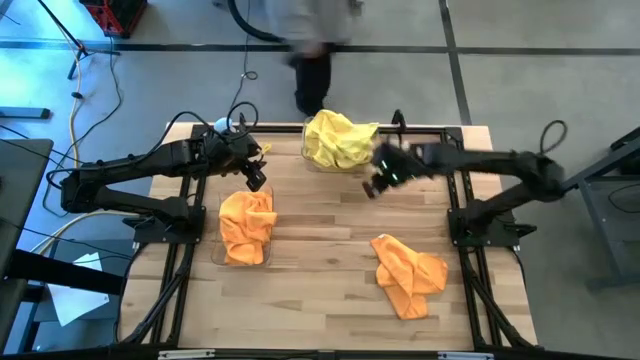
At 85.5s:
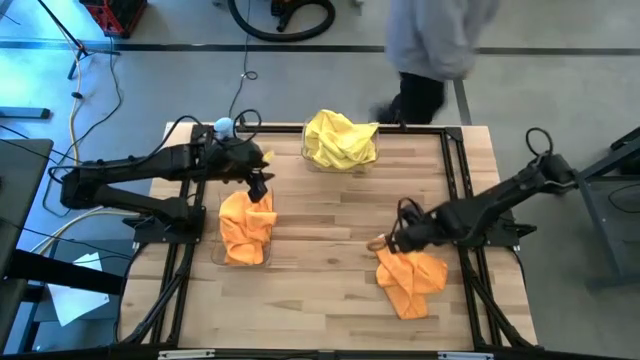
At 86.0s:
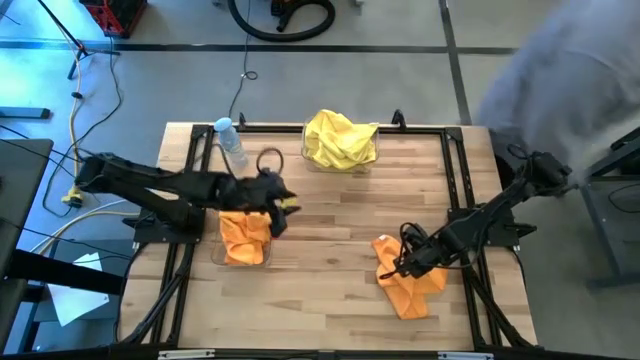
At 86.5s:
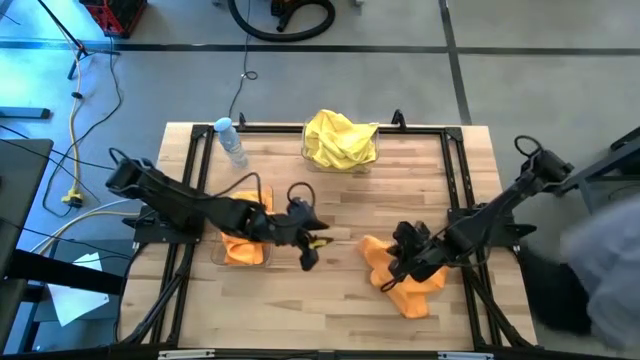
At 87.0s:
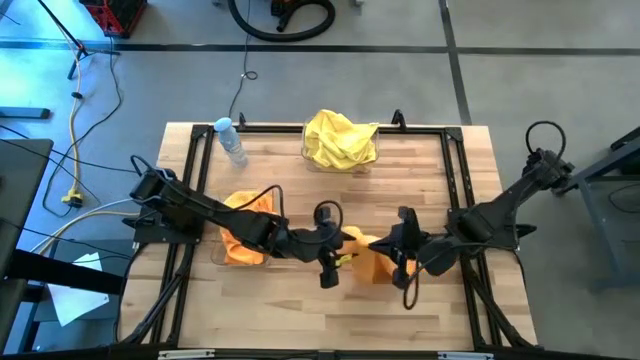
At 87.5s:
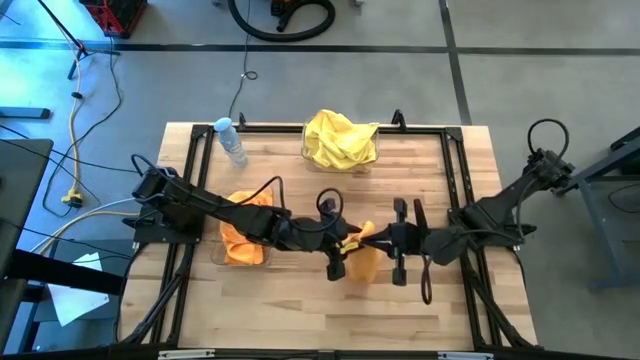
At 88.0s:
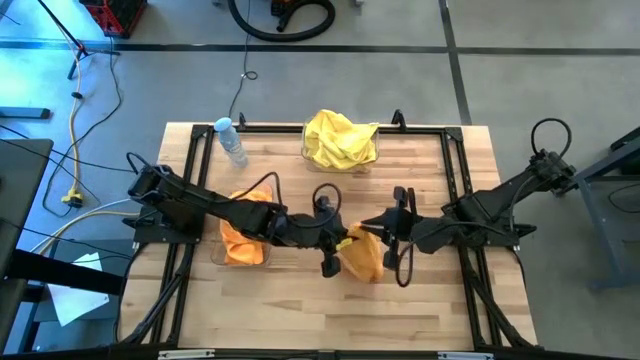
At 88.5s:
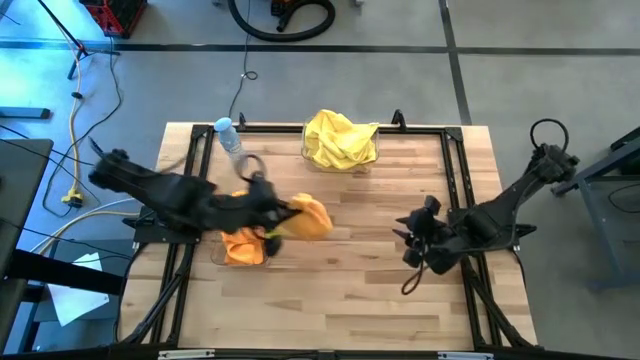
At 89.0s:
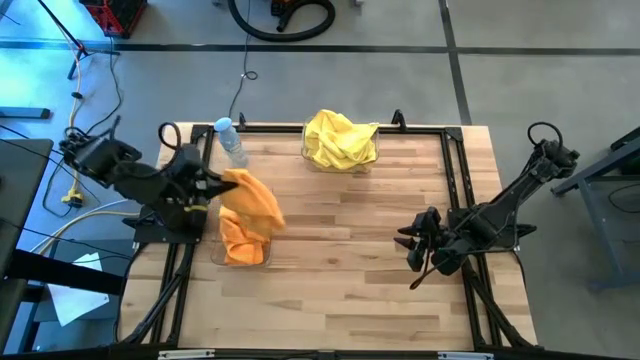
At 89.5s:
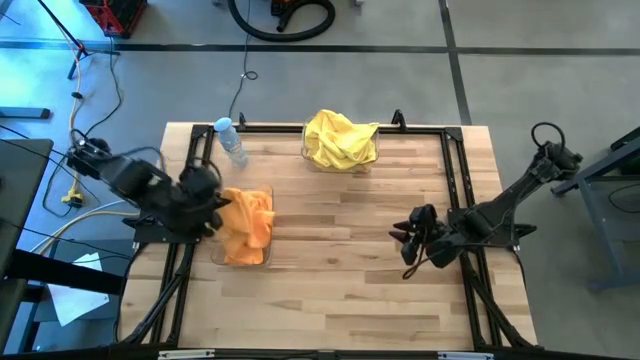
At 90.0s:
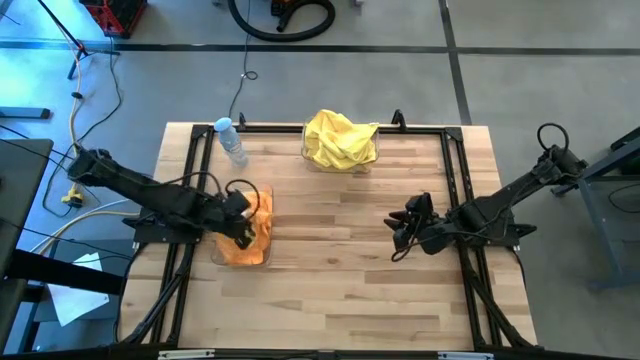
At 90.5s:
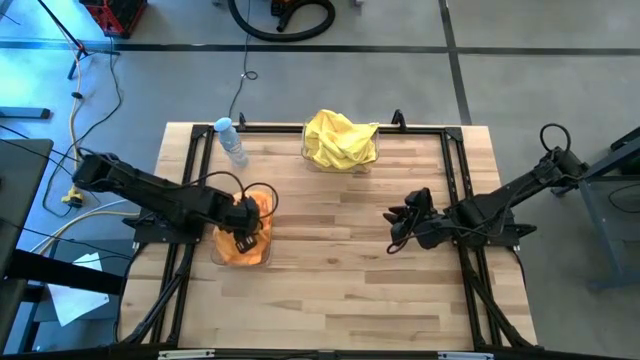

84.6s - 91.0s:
Task: Sort microfiber towel by color & place in baskets
Put the orange microfiber towel into the bottom transparent bin

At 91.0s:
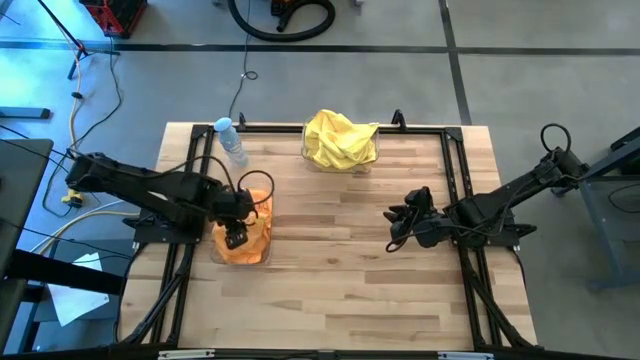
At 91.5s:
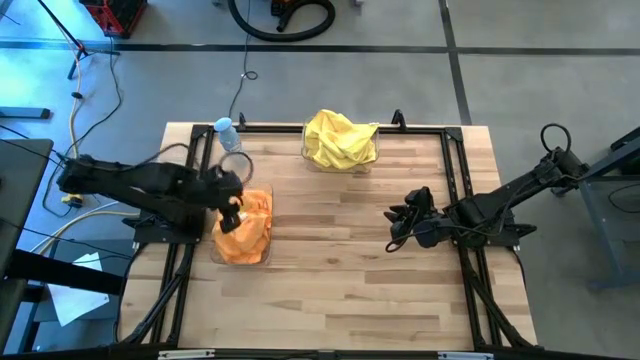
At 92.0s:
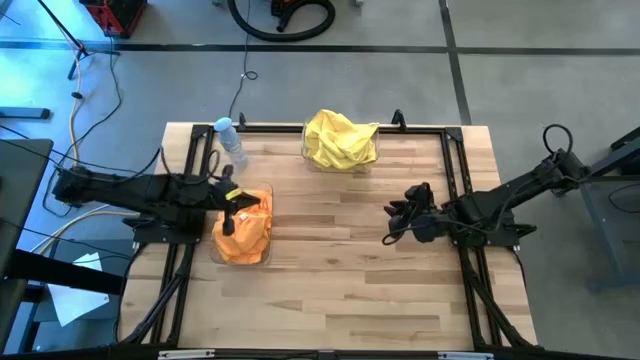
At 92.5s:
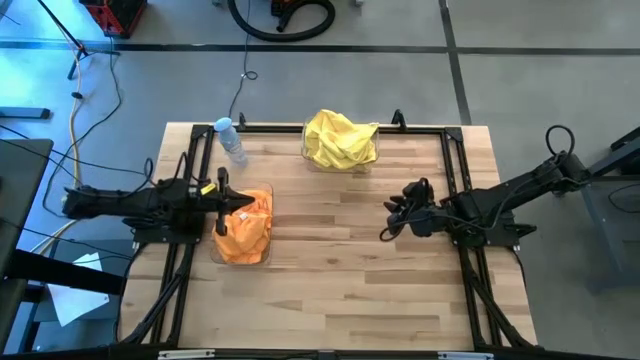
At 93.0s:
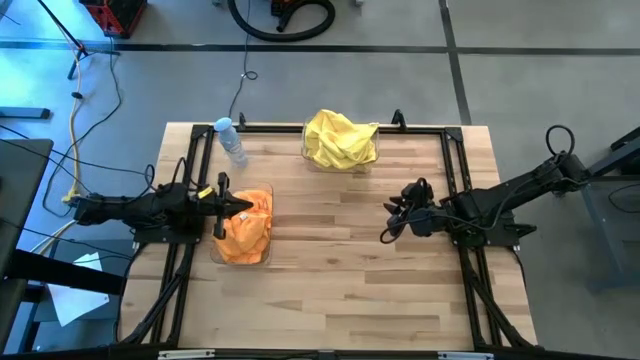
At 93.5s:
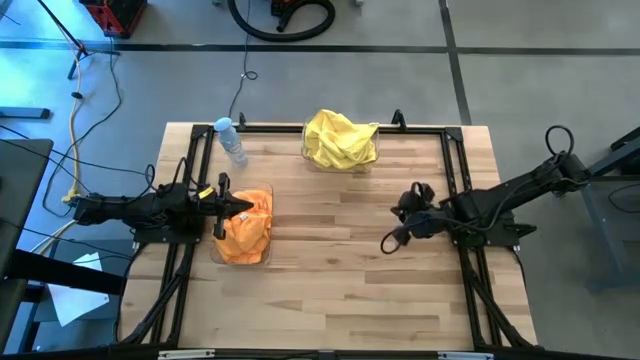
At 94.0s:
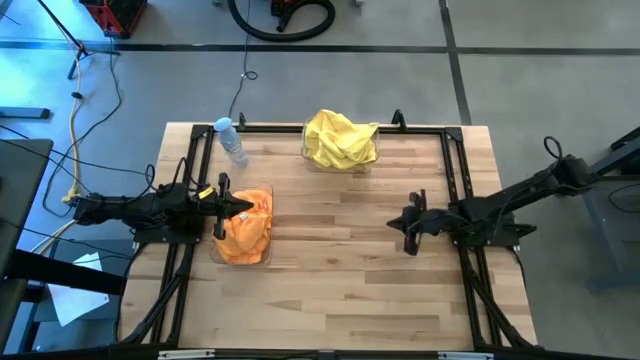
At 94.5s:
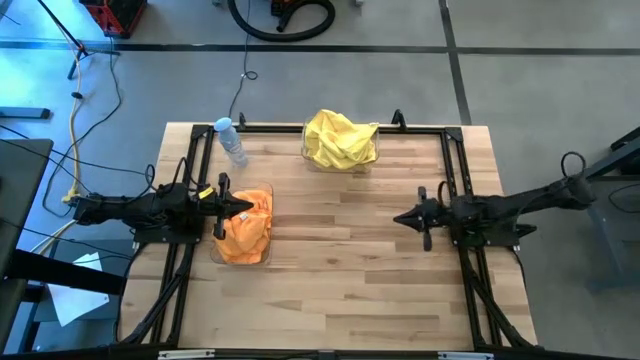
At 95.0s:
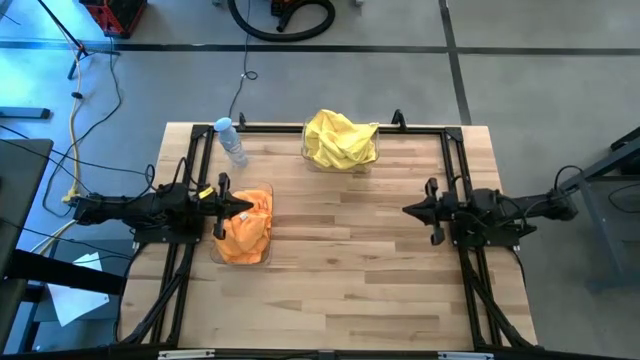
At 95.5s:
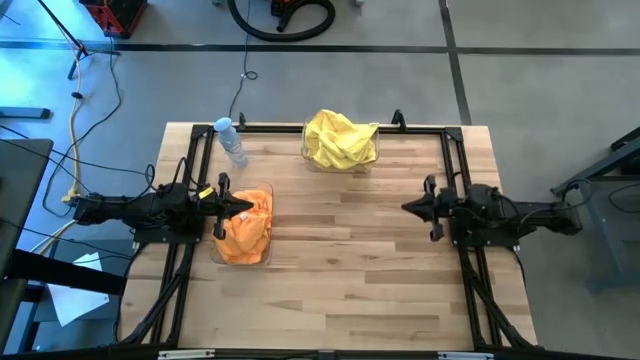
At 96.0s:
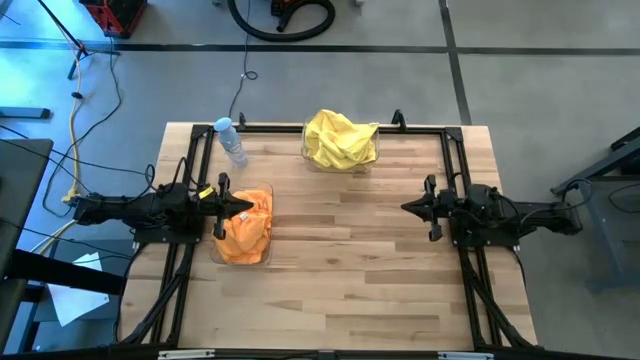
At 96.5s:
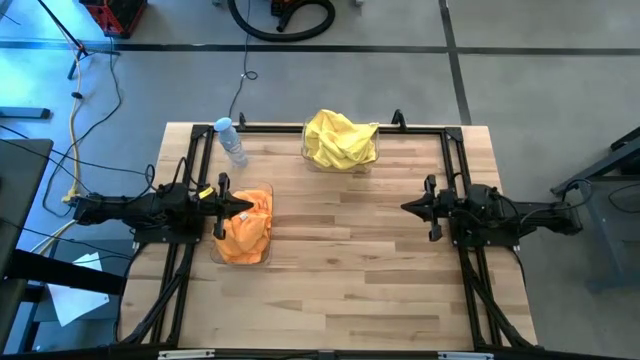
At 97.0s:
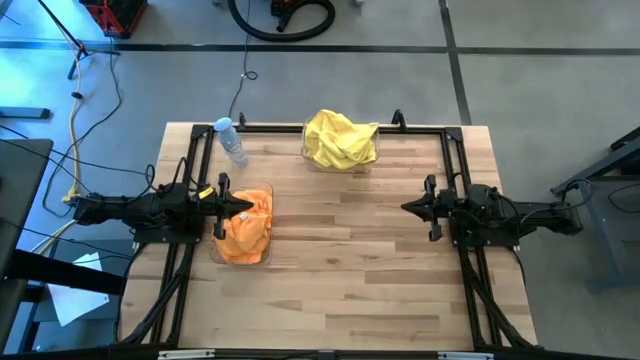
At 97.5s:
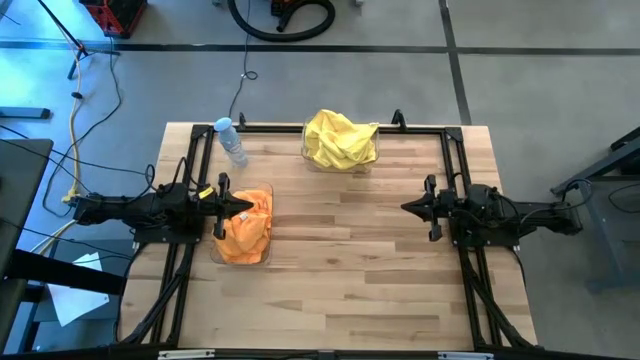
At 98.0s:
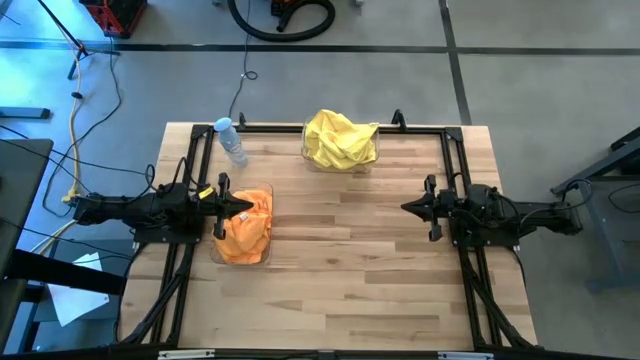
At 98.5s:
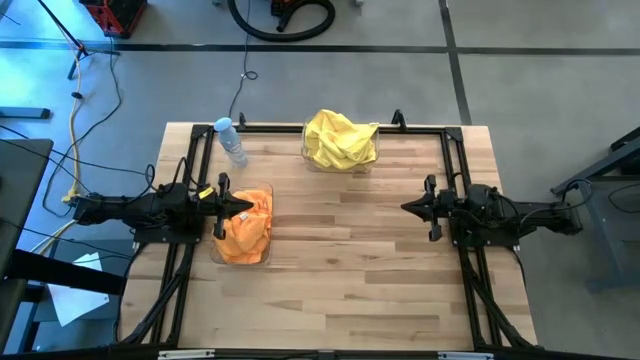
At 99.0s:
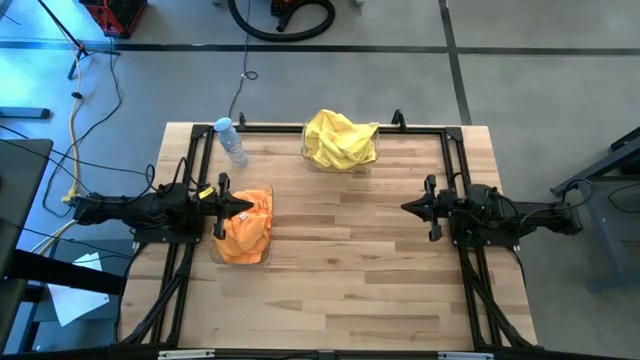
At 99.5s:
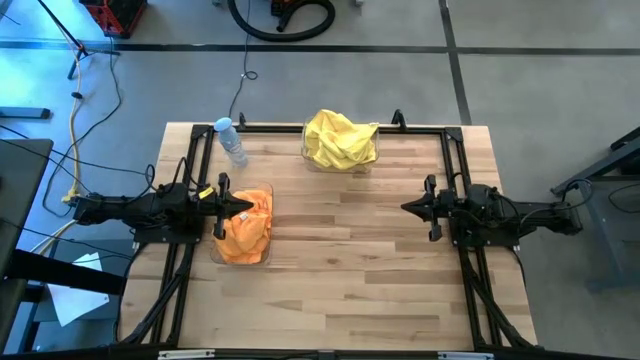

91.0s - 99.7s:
Return to Home Position

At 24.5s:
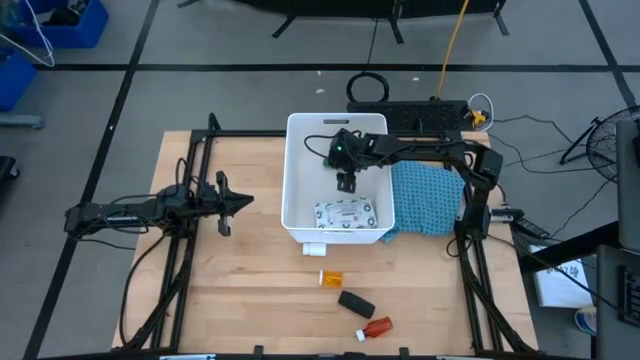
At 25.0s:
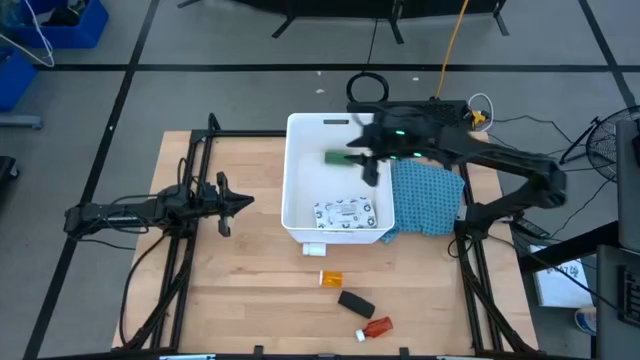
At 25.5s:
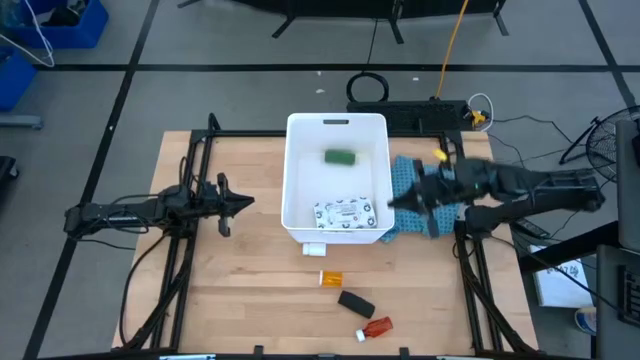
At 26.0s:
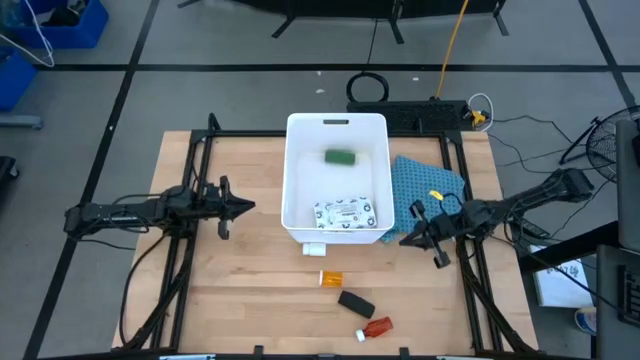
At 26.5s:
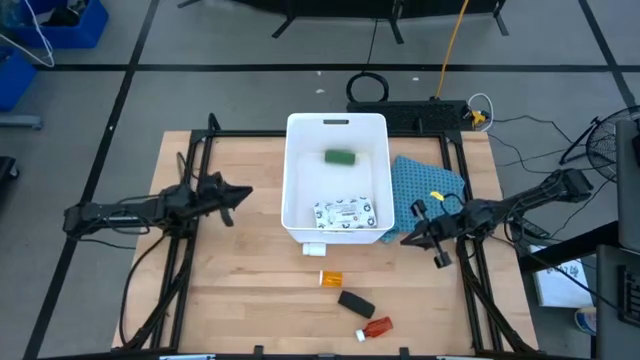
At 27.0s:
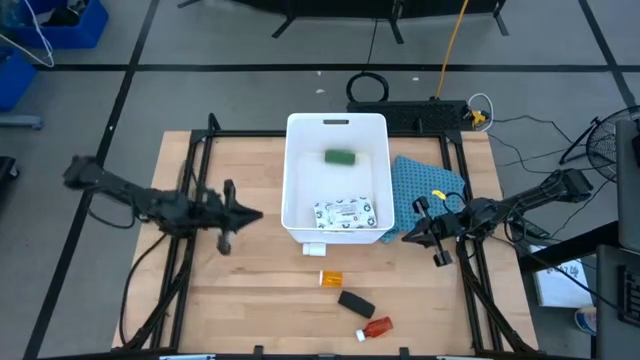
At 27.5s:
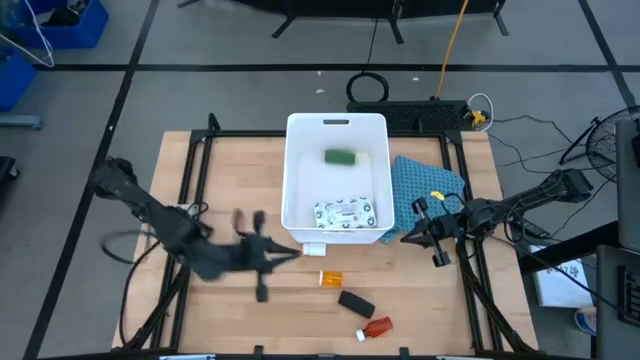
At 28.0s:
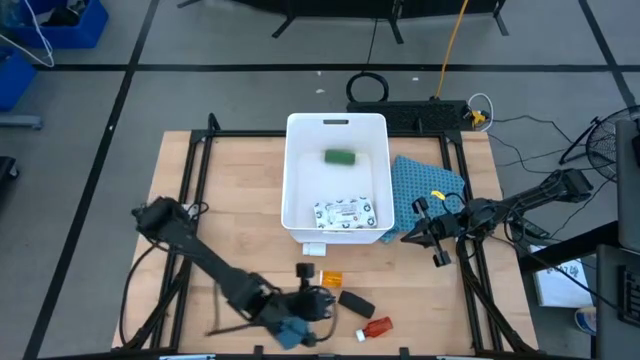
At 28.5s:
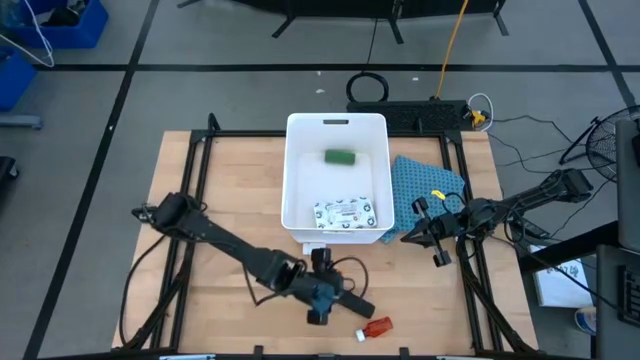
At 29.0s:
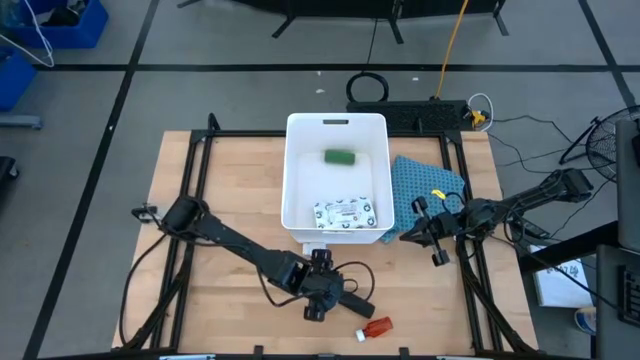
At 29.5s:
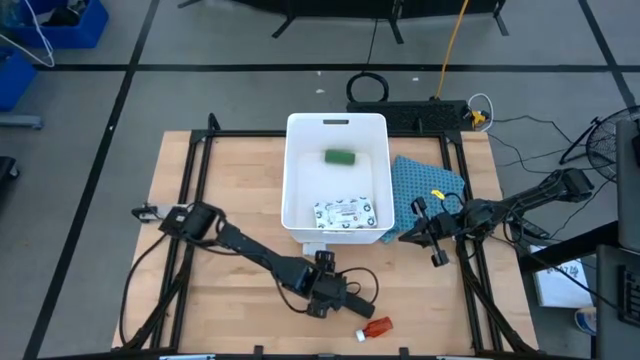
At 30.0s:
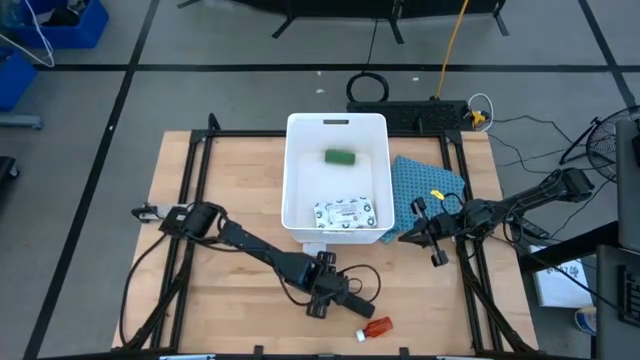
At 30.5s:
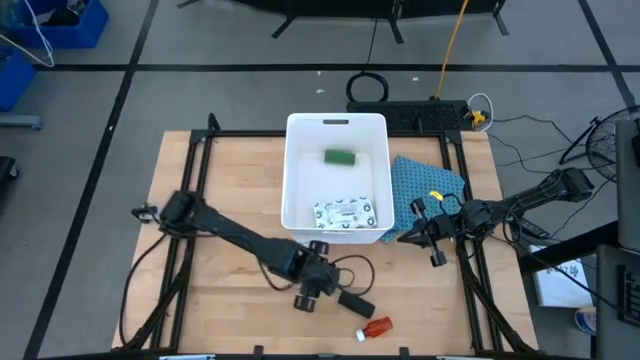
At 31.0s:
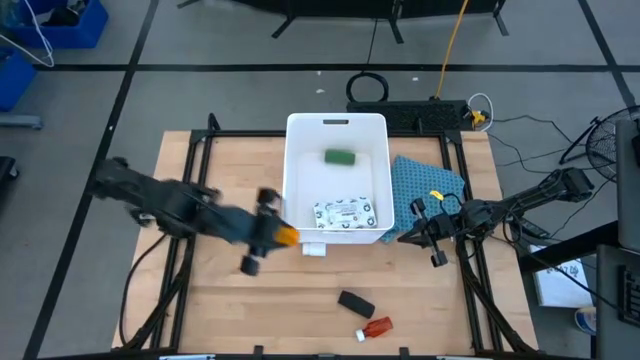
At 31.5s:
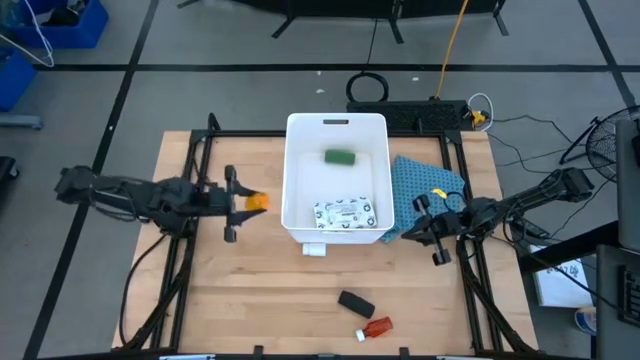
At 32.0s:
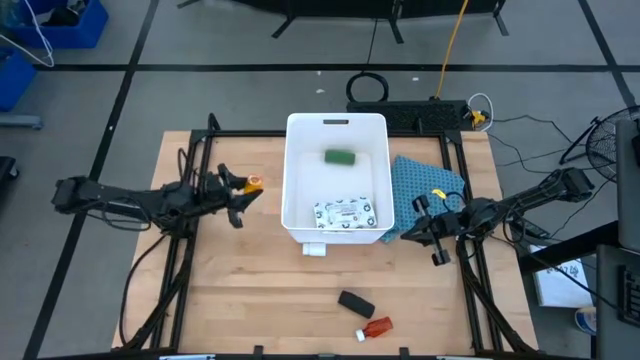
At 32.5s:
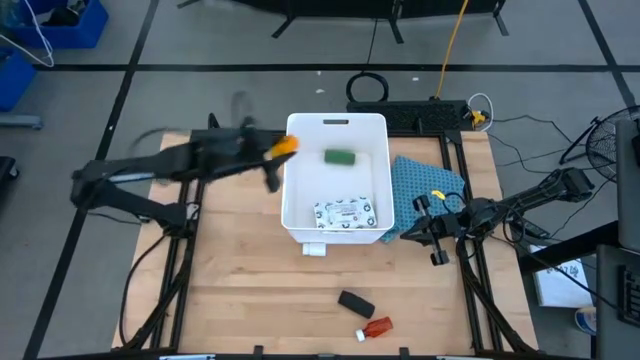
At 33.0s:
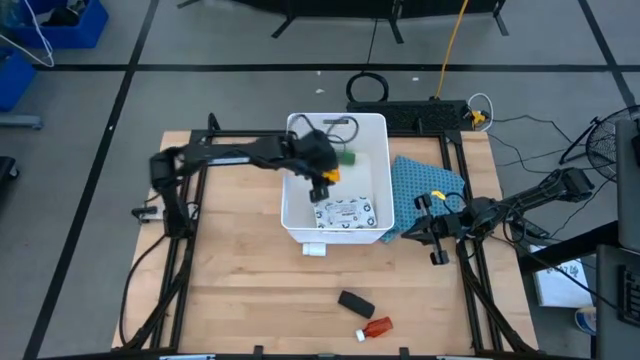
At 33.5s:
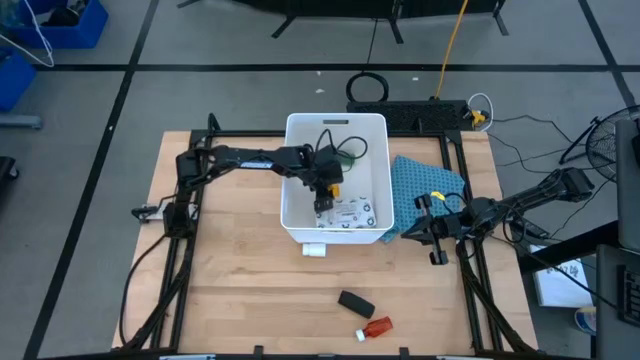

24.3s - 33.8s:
Task: Pick & place medical supplies in basket/bin
Put the orange medicine bottle into the bin
